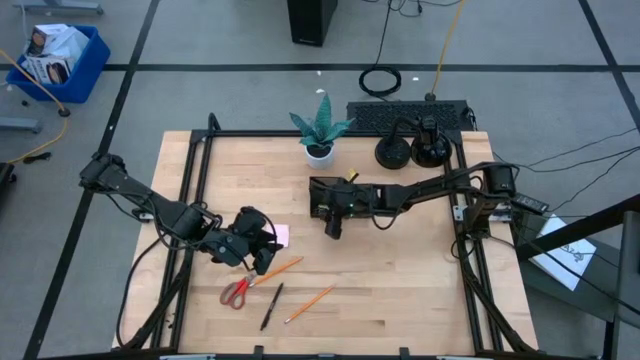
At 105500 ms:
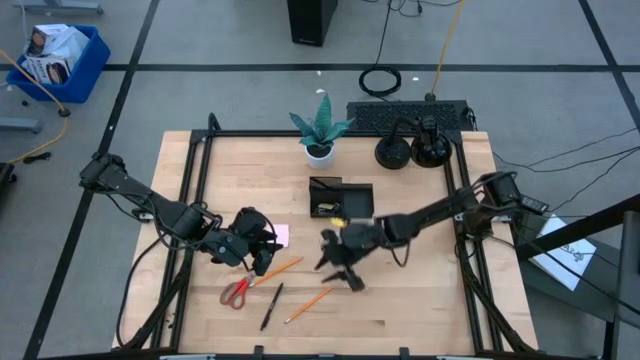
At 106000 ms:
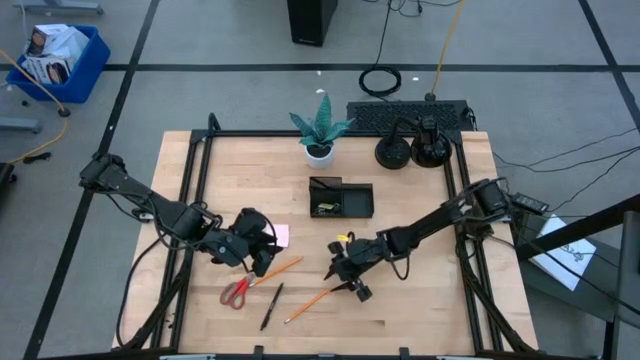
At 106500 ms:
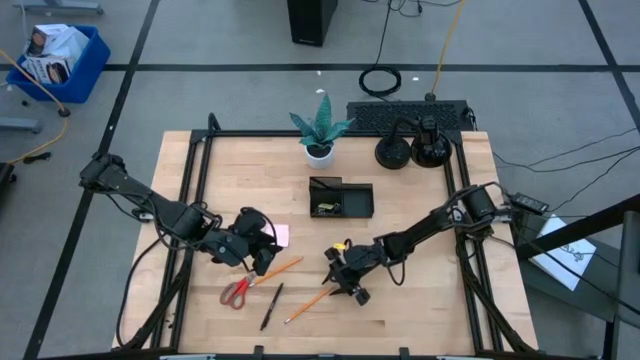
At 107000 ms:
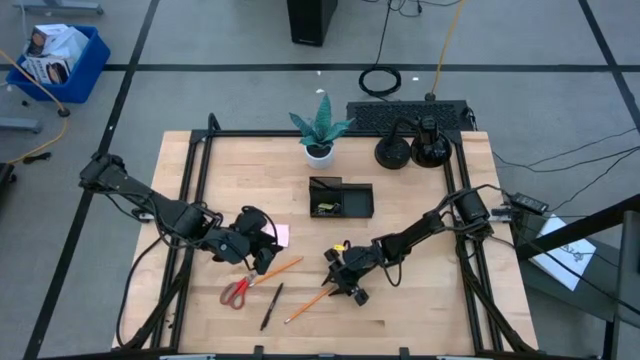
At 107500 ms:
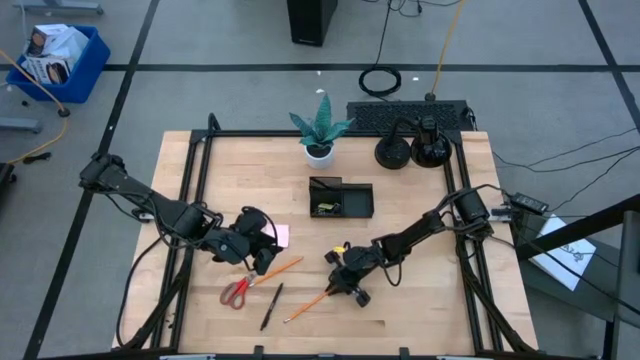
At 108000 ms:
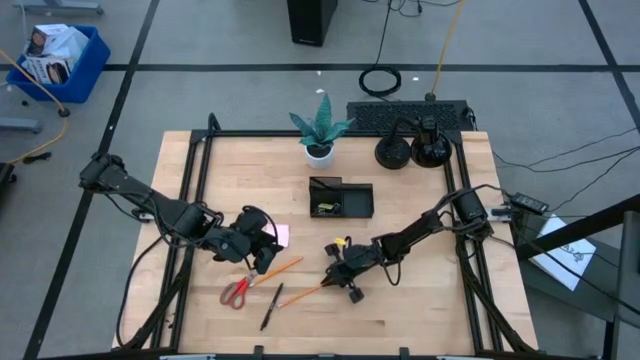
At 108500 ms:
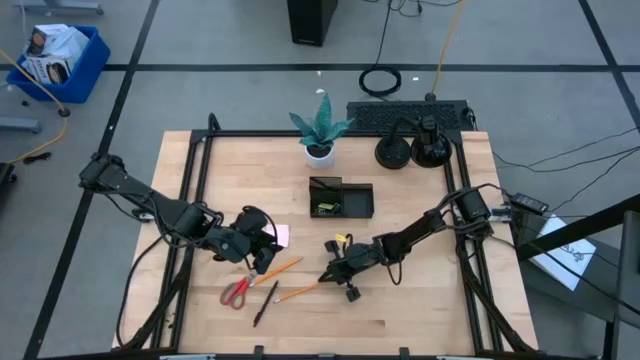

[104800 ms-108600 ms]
Task: Pick and place office supplies into organizer
Put the orange pencil into the black desk organizer

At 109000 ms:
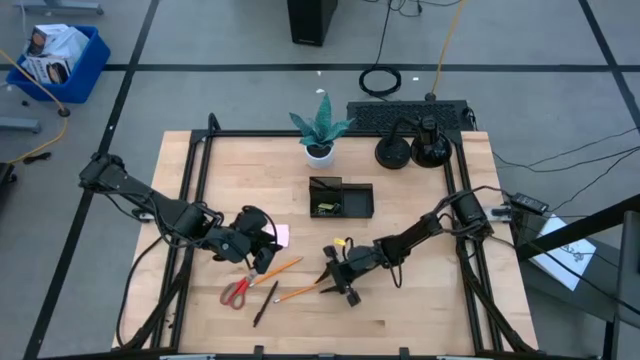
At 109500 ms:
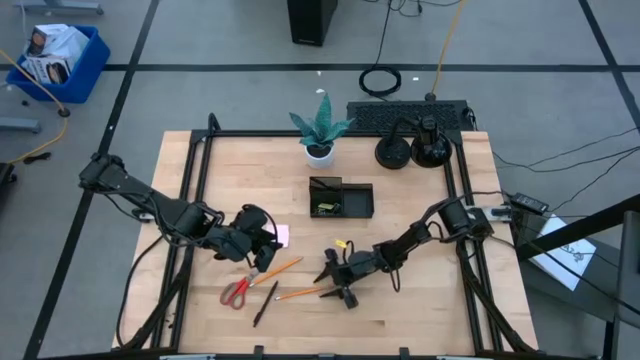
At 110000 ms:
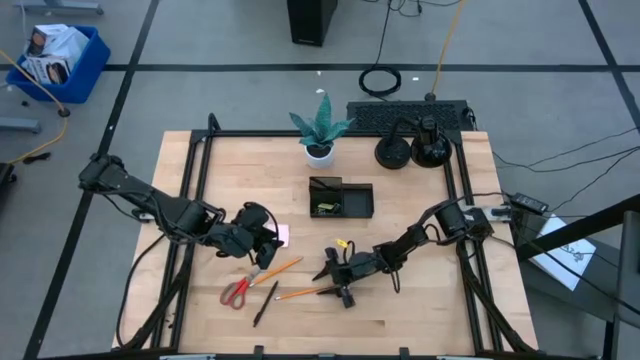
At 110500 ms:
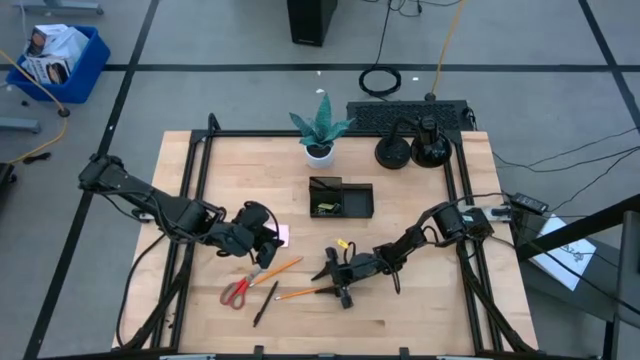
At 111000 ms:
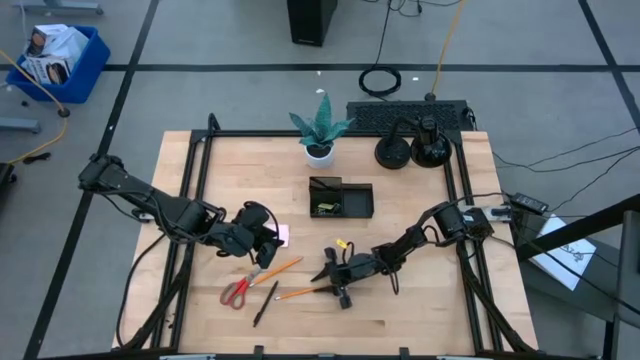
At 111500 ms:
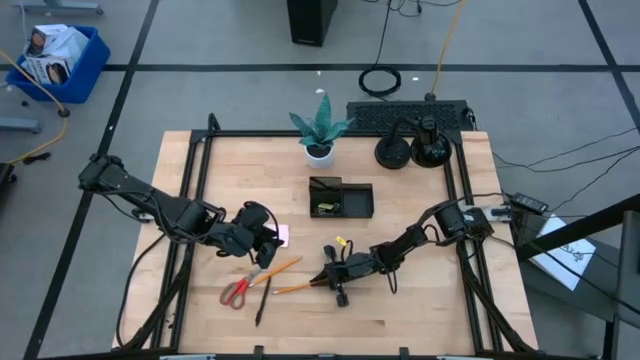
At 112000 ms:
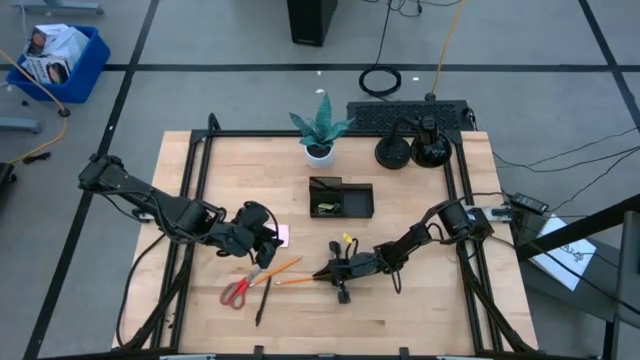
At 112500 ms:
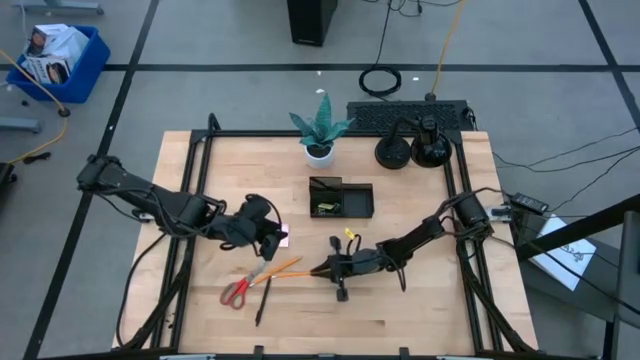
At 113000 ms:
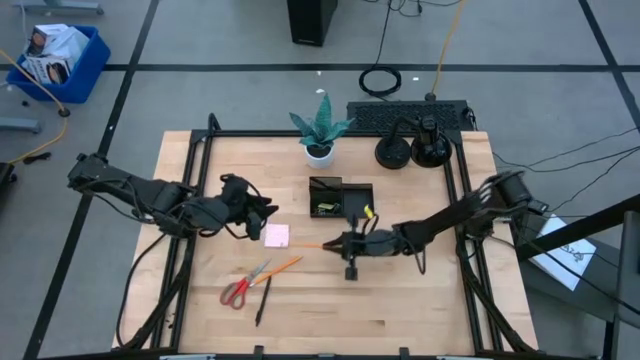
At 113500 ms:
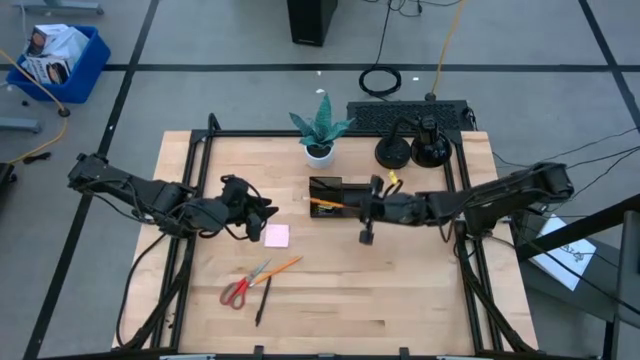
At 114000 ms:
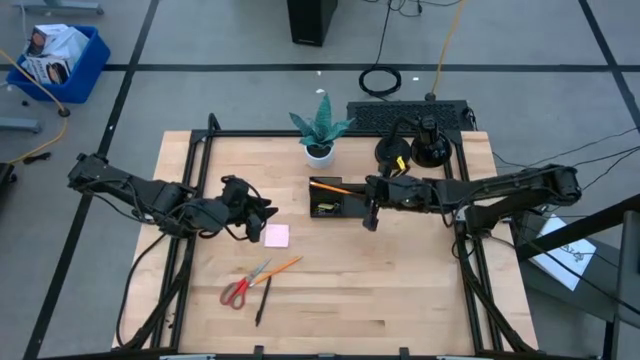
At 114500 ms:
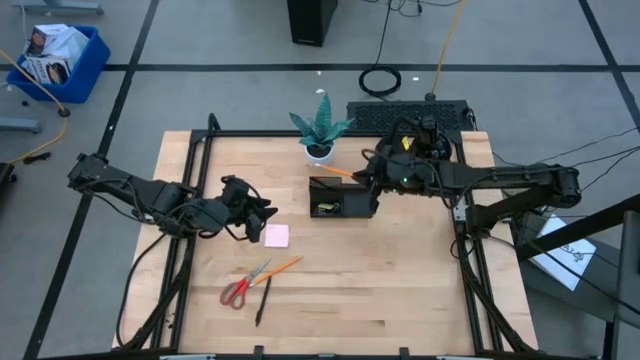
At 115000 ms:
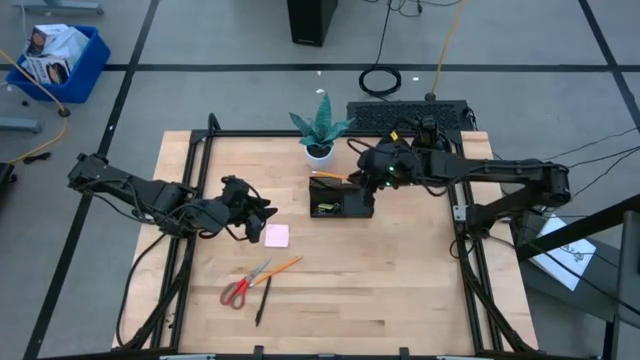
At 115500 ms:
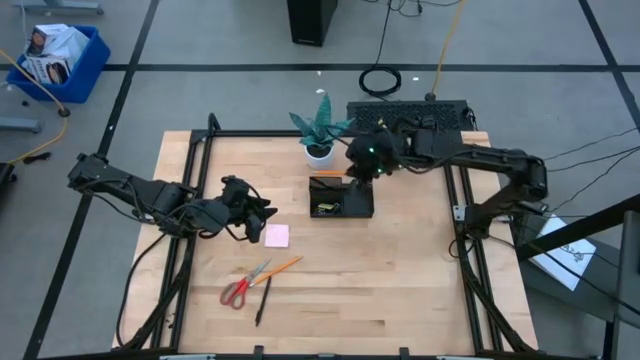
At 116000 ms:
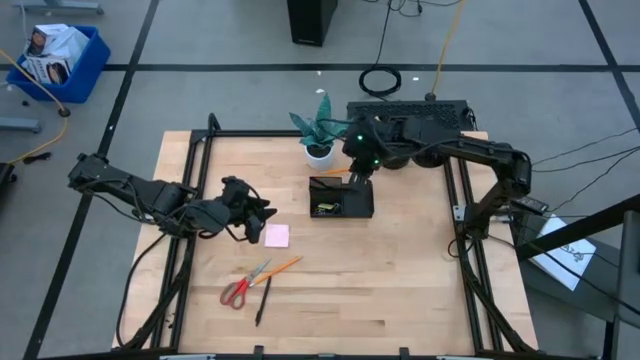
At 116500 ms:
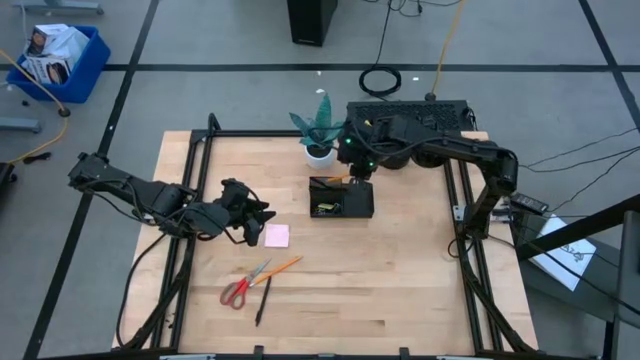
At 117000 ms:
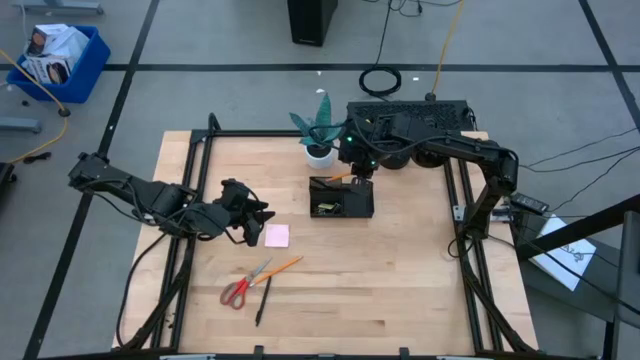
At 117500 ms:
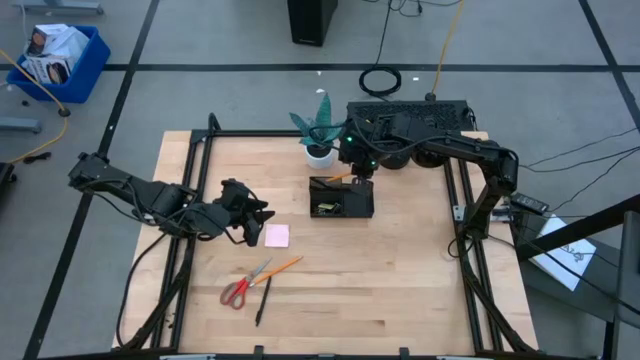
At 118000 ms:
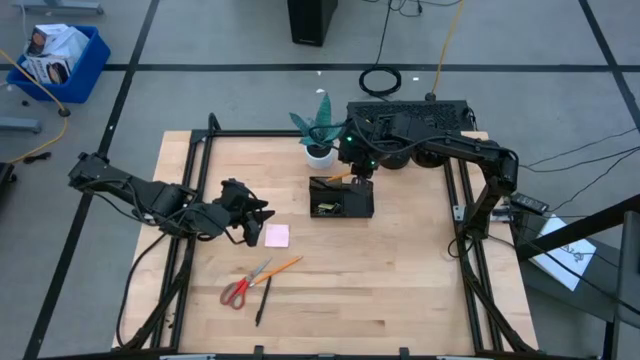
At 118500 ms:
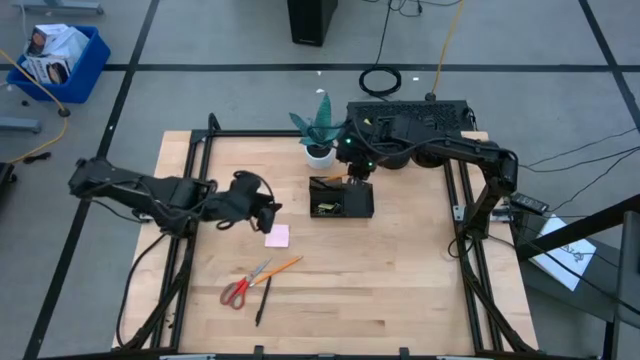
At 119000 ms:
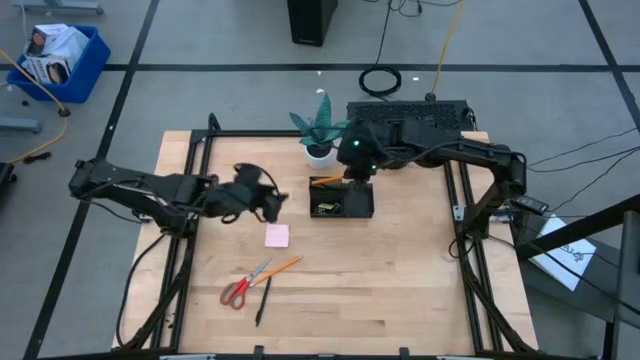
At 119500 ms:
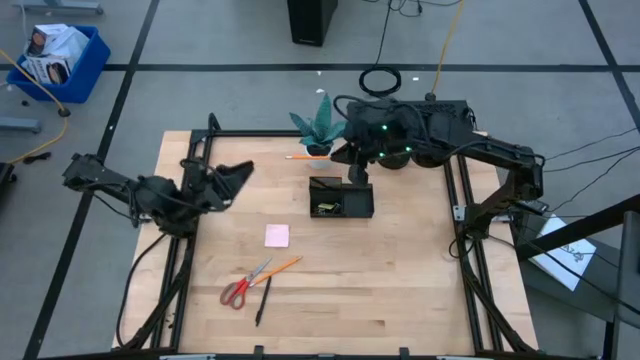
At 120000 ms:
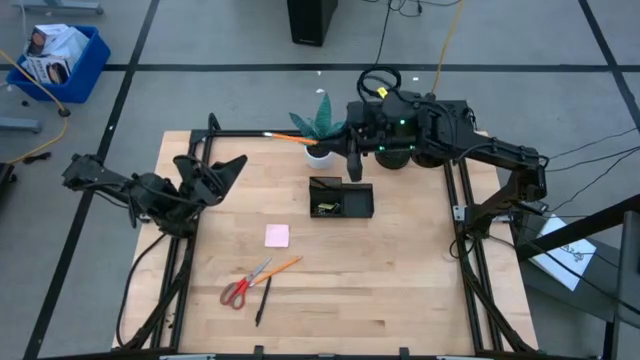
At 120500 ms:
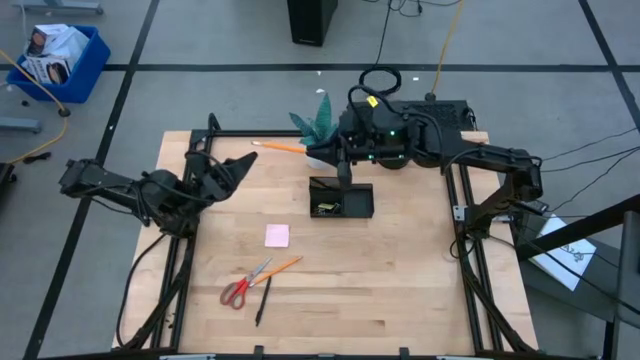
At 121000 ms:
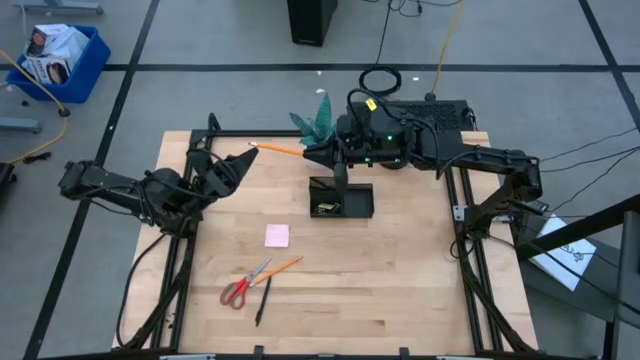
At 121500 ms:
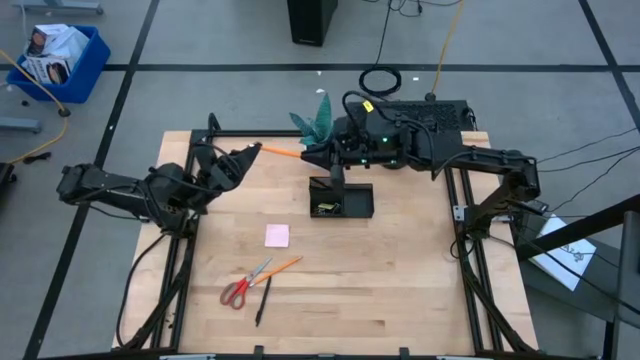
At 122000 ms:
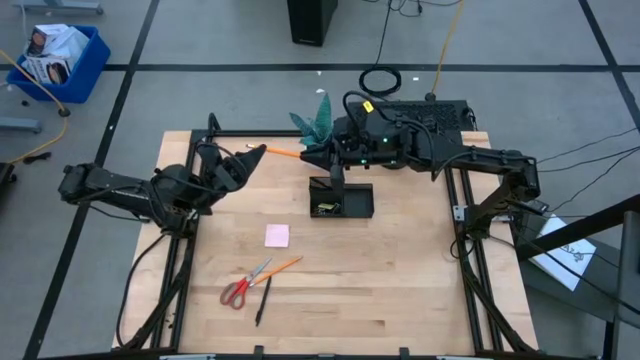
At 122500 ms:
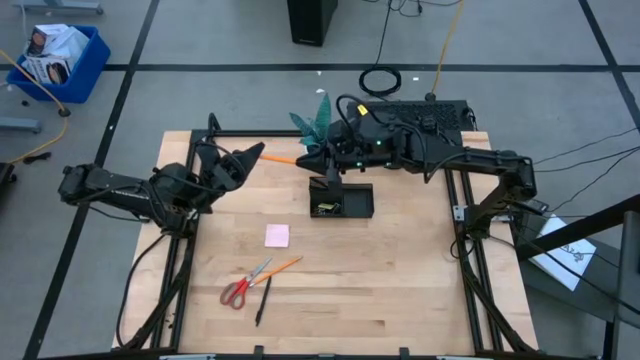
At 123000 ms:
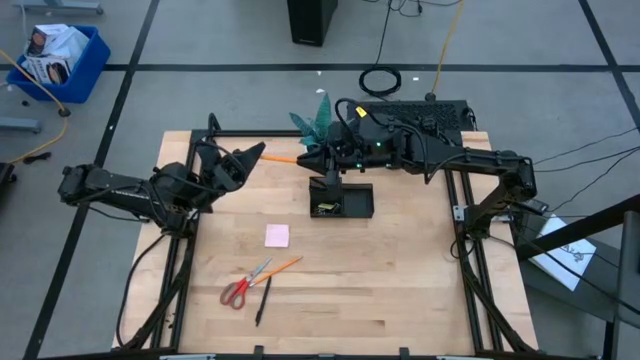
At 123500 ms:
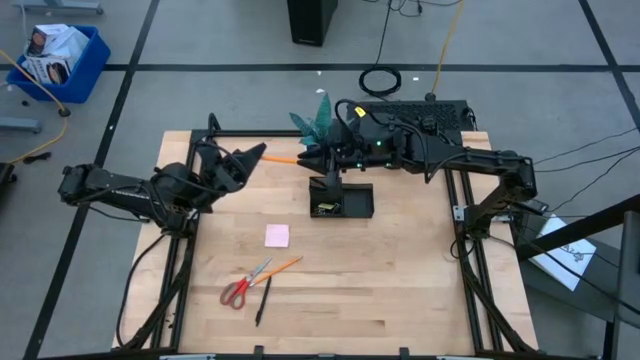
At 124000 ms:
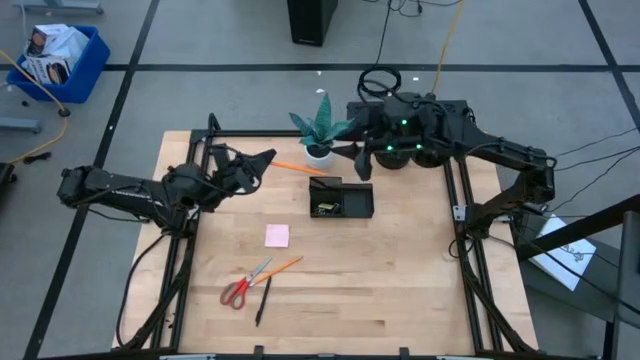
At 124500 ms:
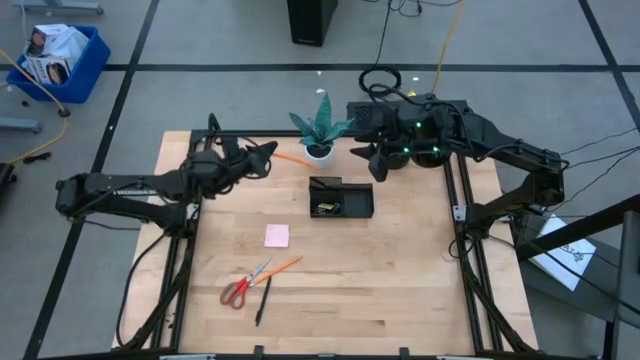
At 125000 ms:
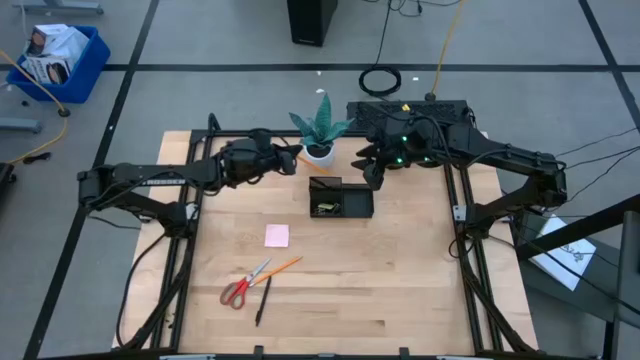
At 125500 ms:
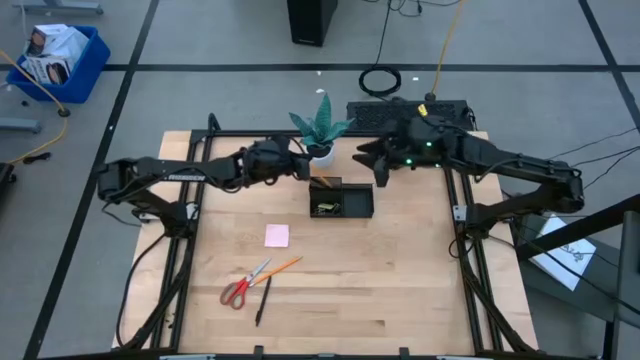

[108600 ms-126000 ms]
Put the orange pencil into the black desk organizer
